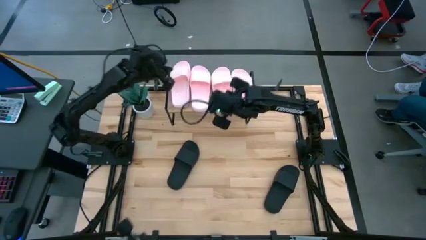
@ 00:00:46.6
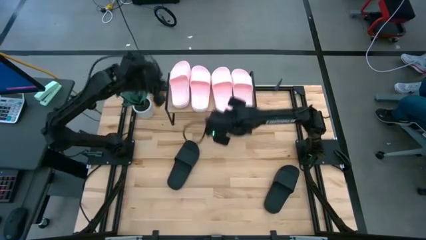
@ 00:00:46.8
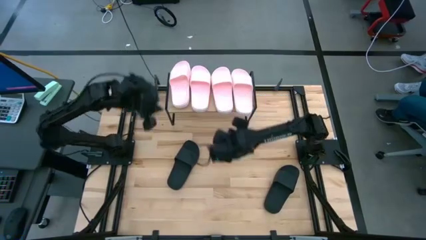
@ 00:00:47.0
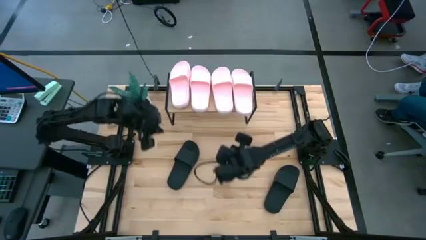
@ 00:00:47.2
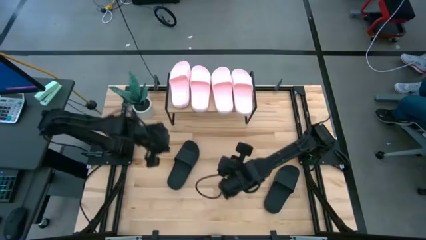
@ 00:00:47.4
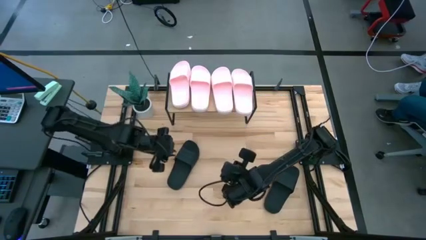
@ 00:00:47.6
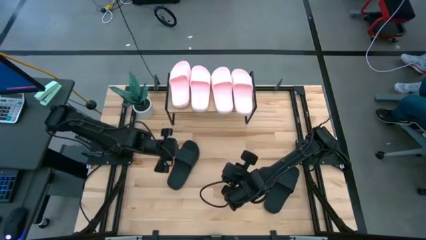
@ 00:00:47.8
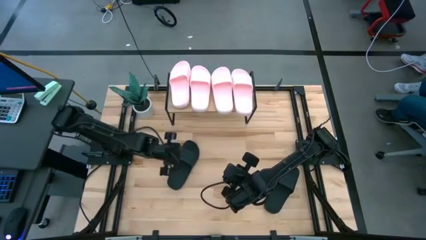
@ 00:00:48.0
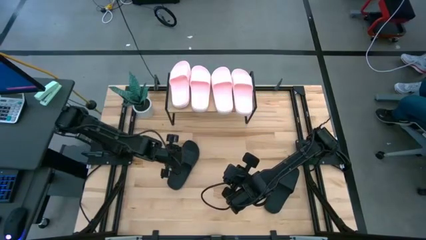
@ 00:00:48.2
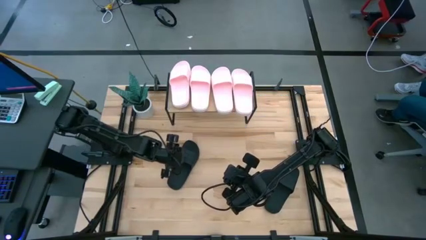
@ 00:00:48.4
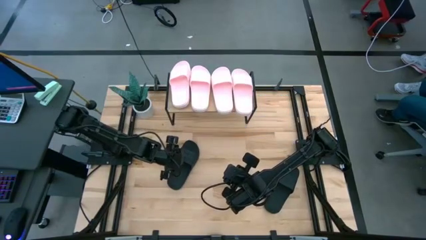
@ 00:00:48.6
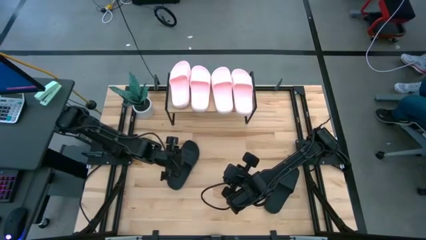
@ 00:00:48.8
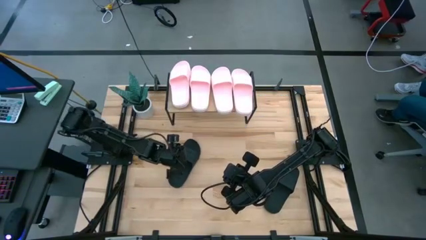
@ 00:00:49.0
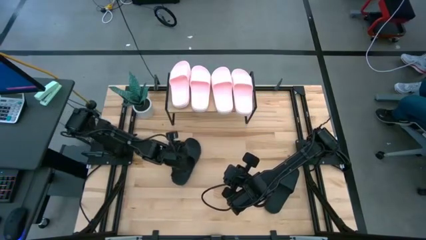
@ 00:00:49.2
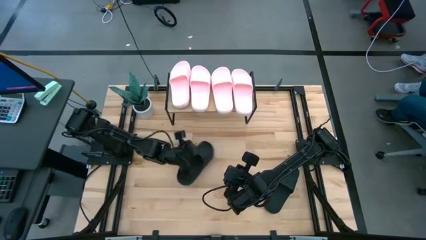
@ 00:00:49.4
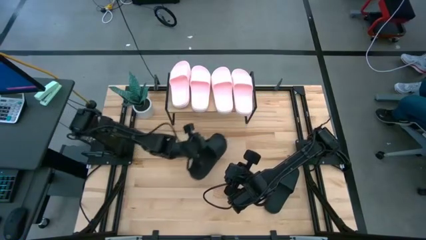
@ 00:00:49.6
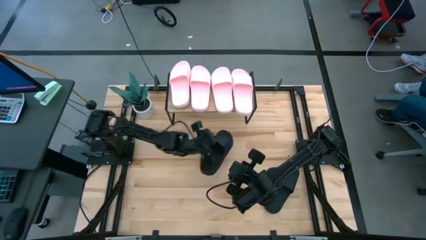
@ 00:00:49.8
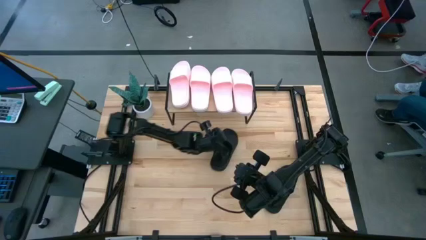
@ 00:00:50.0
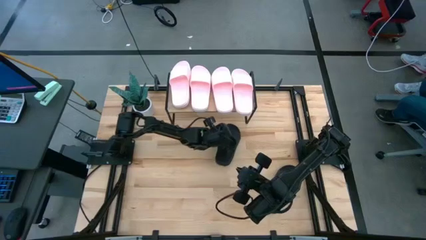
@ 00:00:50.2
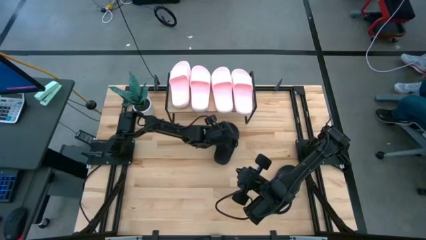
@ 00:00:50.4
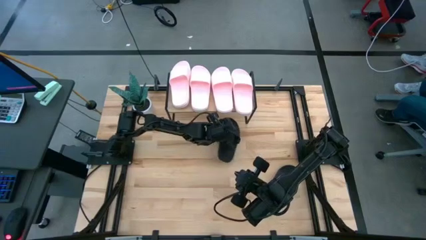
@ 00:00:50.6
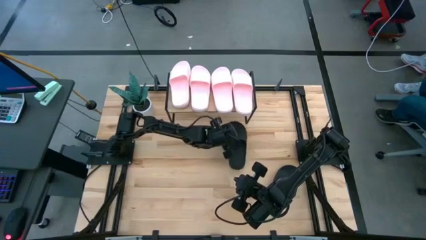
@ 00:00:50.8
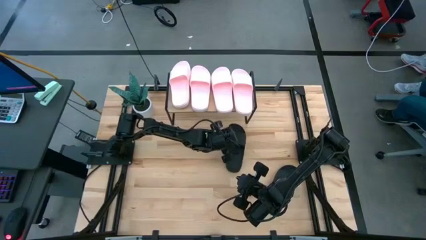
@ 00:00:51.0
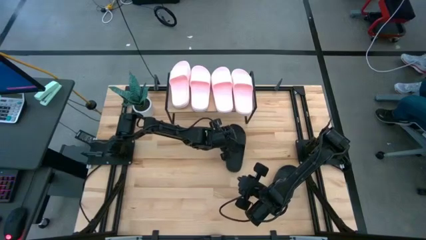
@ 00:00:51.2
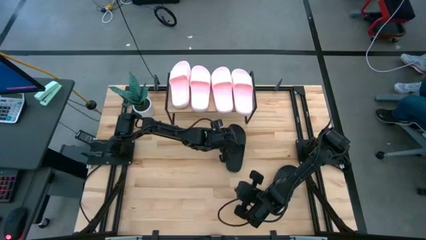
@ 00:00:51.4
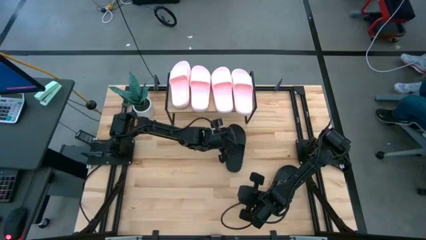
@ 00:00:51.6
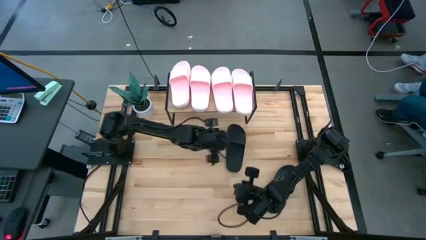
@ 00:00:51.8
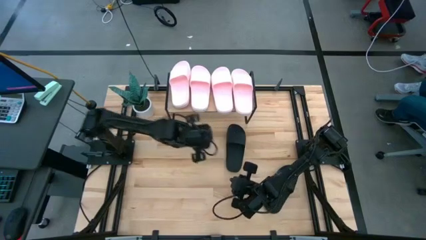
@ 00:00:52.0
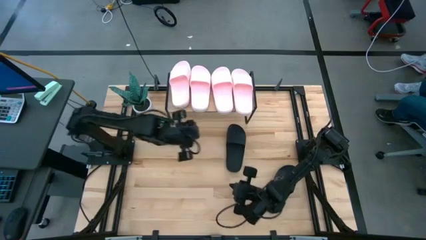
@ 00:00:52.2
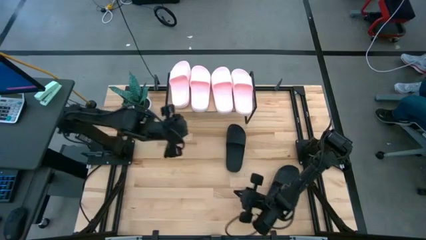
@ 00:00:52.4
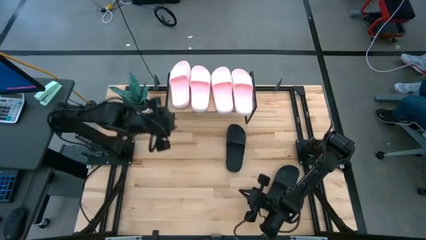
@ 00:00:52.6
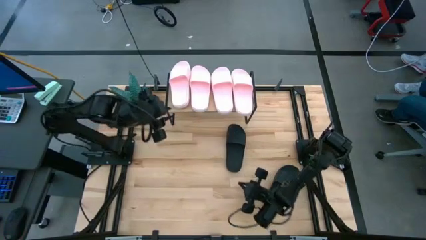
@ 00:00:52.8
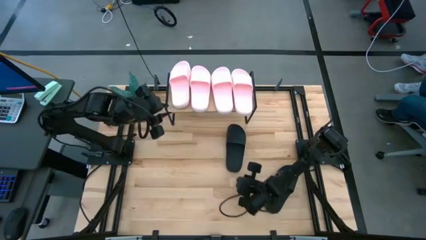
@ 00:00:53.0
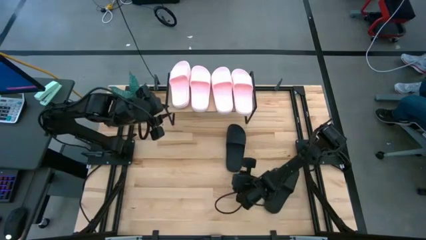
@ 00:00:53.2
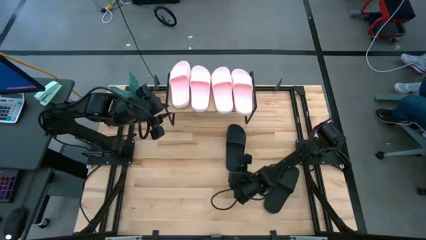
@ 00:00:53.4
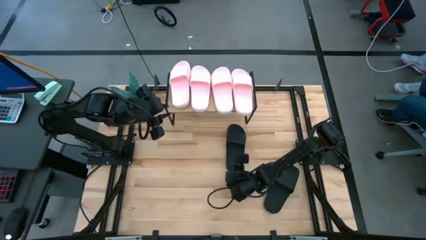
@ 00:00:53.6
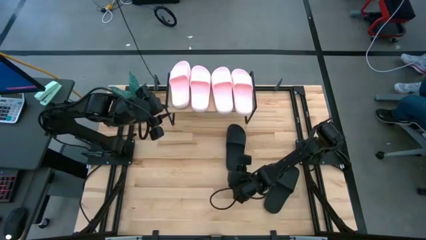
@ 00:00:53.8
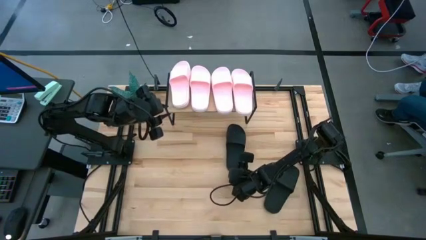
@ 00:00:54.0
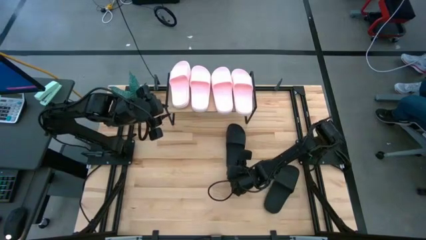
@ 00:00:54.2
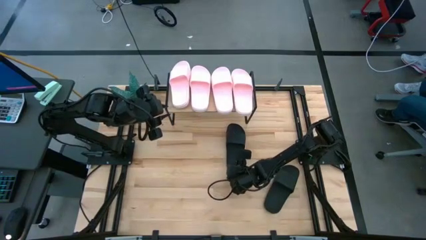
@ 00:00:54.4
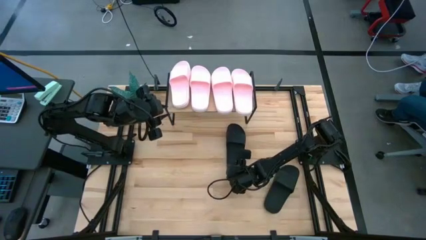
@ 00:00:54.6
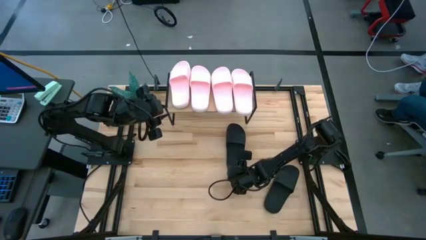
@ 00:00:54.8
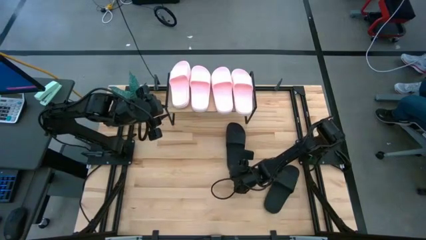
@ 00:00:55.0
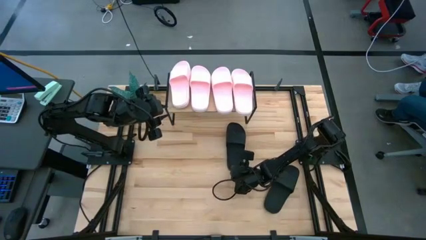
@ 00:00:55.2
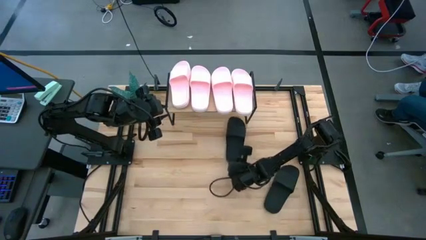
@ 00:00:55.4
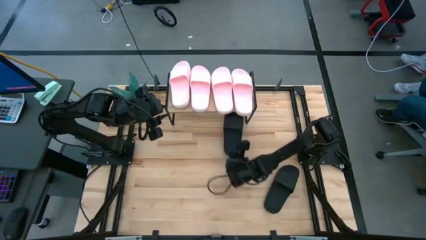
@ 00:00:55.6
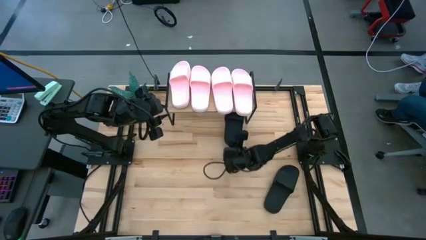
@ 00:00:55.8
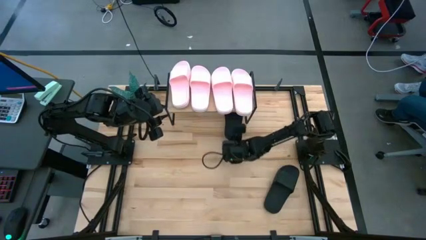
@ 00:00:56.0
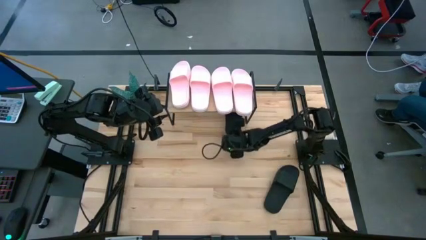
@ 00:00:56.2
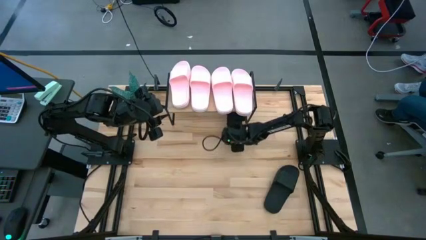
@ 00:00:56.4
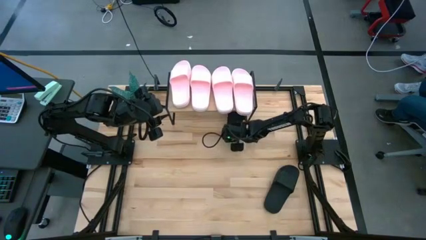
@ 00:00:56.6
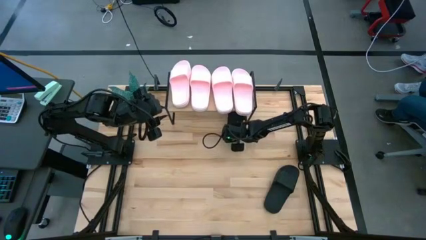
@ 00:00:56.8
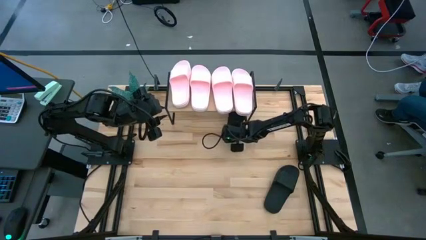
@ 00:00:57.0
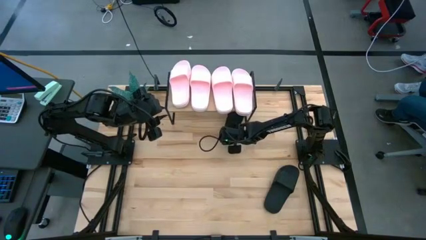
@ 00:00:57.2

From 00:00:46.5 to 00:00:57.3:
Task: Pick and place slides into the shelf
Put the left black slides under the shelf

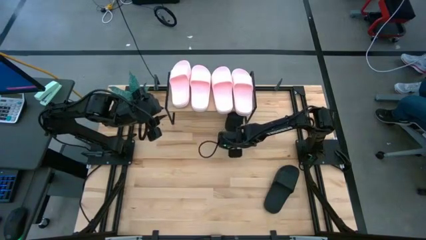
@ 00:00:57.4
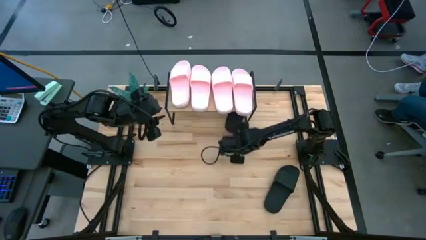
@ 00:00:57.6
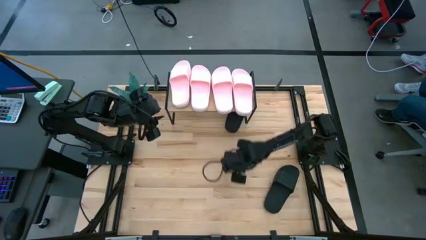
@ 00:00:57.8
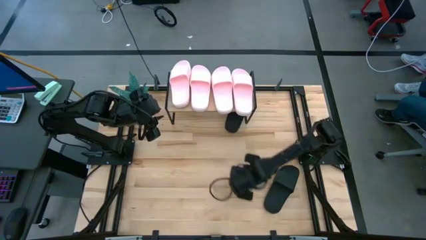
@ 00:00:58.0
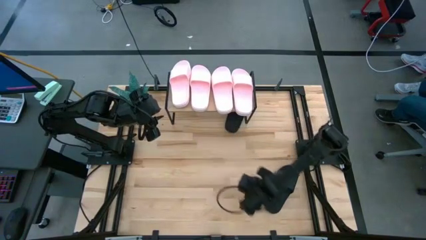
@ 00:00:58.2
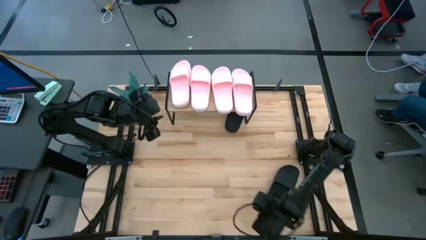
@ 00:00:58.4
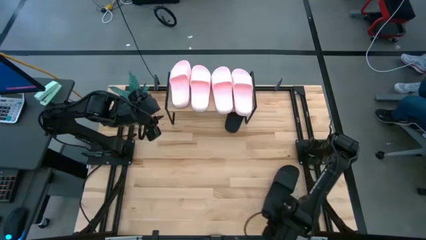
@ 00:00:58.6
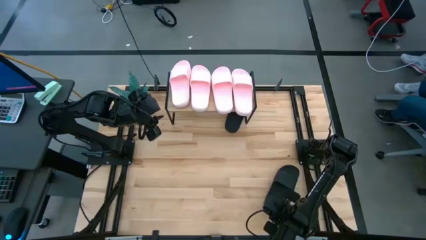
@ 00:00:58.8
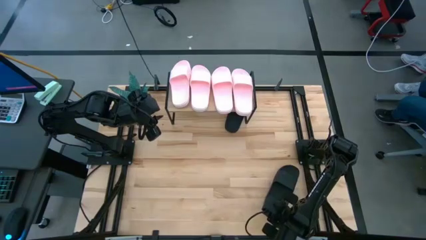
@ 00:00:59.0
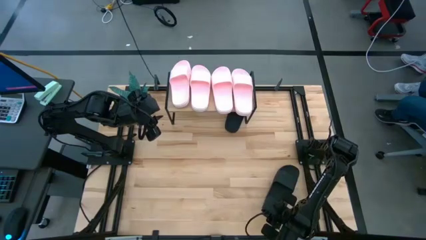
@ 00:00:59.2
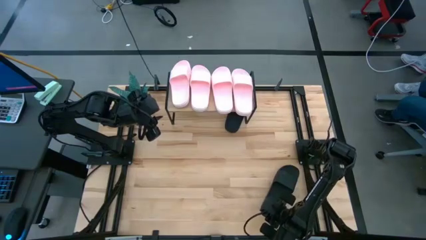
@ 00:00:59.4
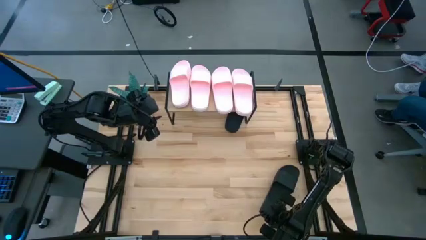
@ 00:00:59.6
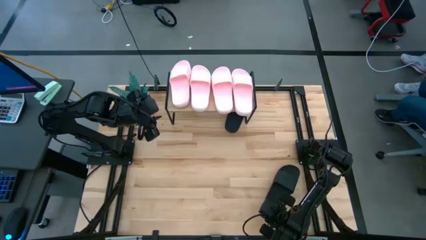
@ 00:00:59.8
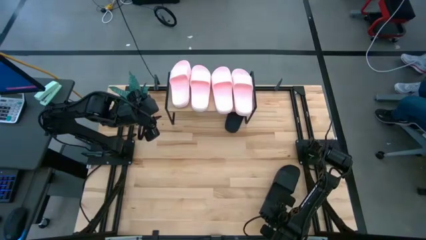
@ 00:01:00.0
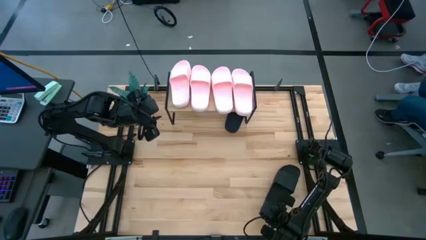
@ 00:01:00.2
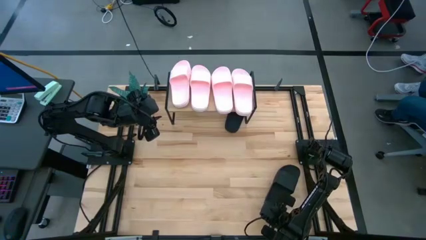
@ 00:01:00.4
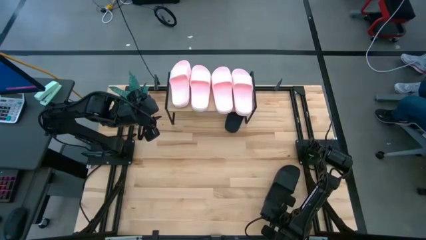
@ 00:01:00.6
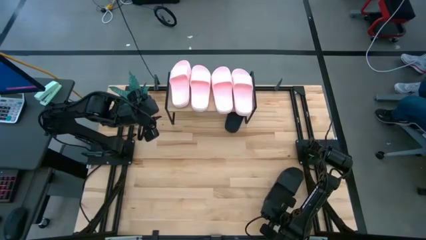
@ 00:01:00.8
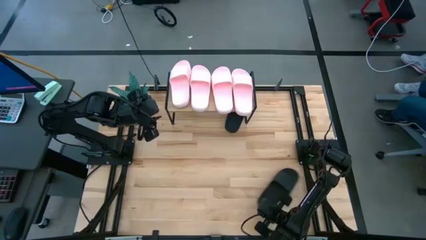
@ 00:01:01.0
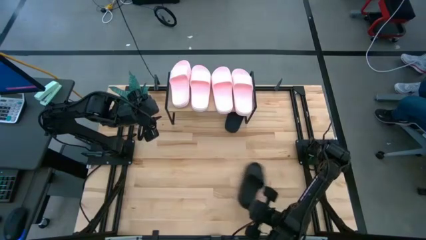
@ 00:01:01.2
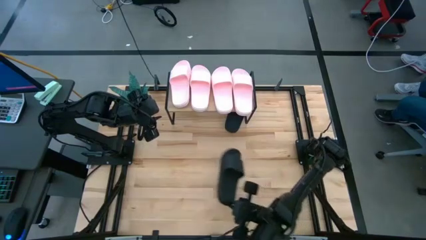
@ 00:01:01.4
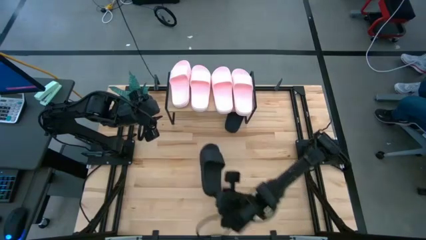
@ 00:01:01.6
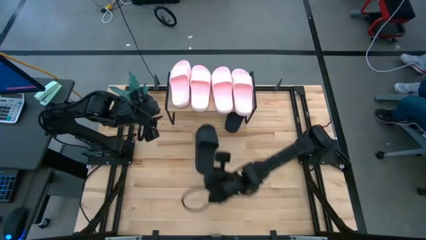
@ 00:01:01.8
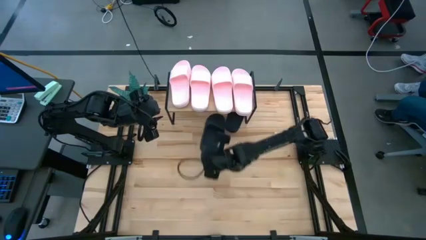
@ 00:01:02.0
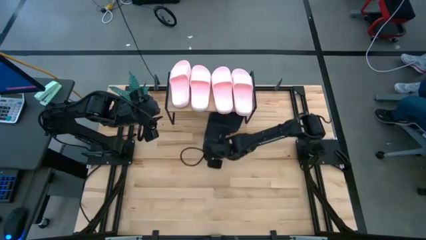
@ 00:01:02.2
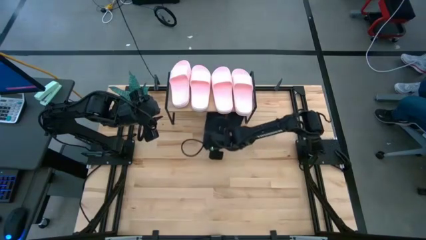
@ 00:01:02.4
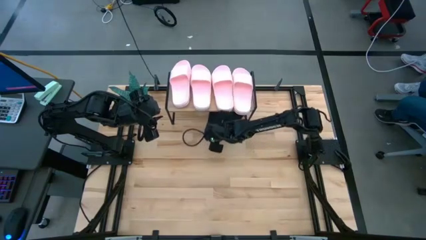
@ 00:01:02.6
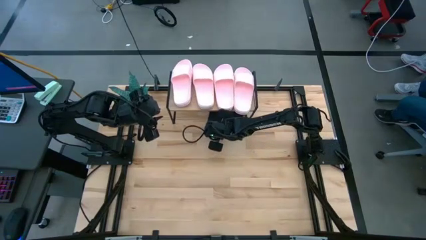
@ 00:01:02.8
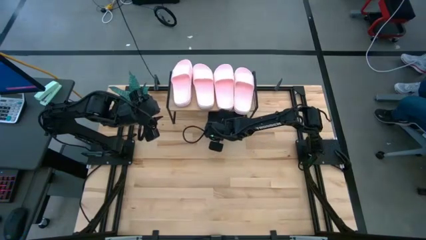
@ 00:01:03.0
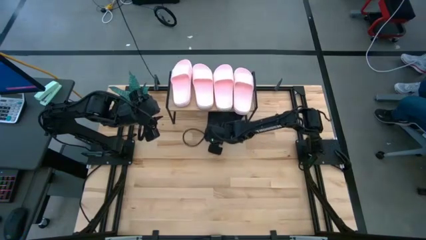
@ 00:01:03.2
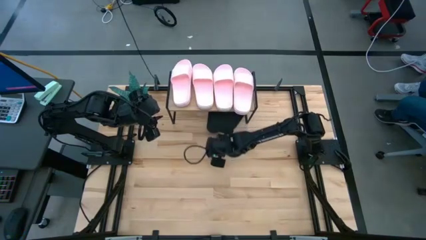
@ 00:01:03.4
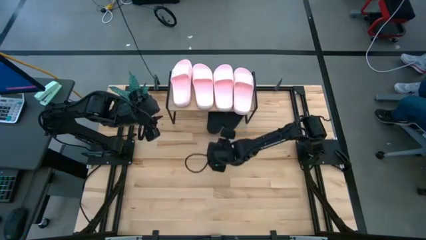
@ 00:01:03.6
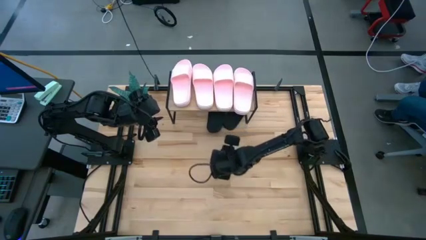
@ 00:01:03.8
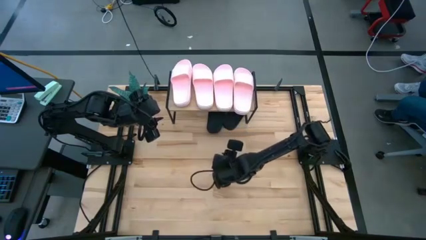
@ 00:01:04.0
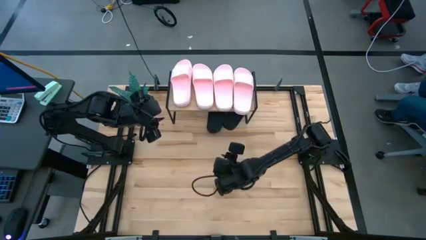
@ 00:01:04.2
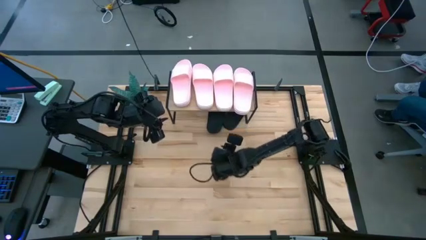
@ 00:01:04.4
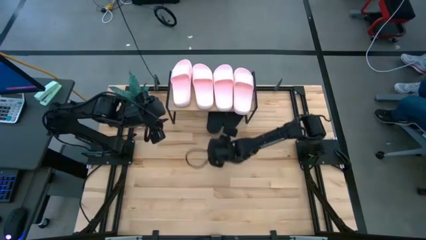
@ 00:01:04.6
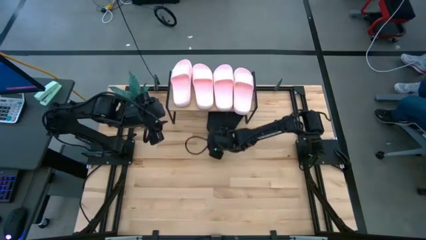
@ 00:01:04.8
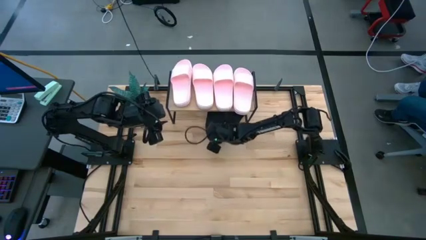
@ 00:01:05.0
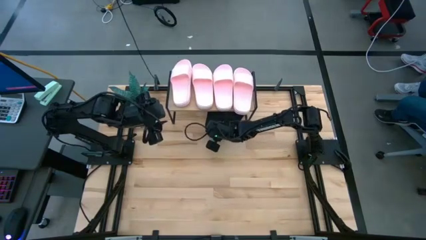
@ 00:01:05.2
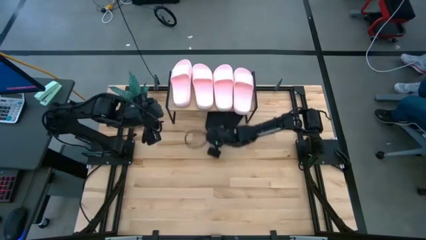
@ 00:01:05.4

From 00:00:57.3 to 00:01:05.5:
Put the black slides under the shelf
